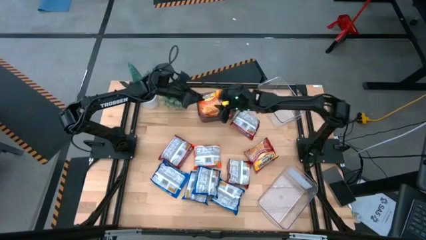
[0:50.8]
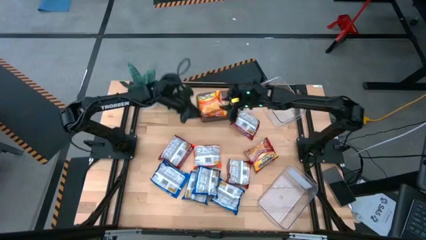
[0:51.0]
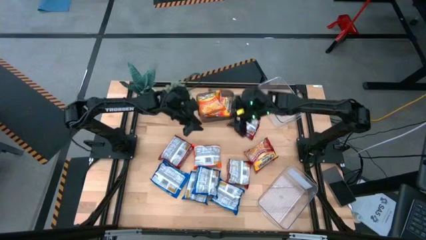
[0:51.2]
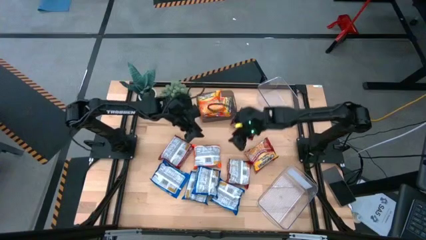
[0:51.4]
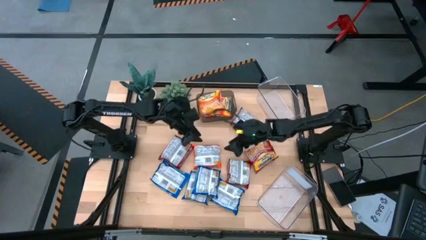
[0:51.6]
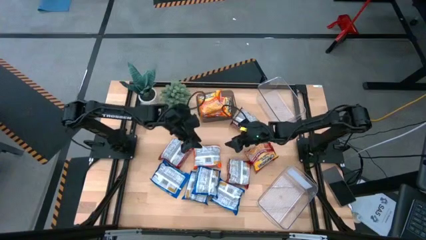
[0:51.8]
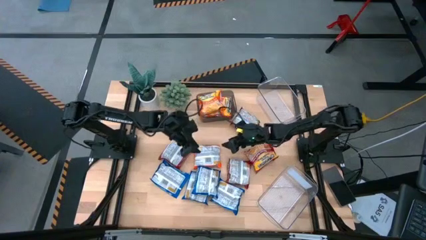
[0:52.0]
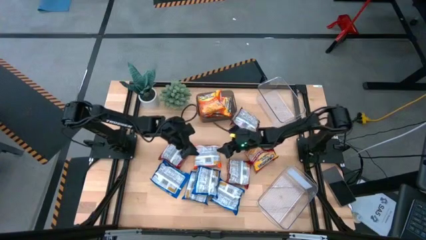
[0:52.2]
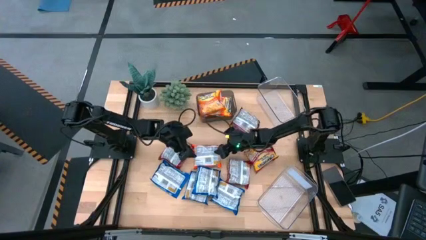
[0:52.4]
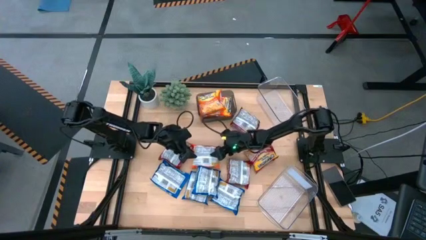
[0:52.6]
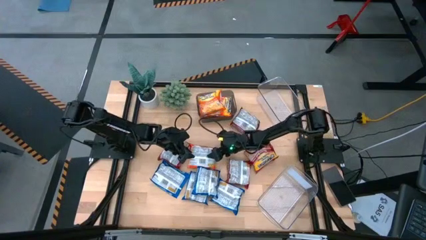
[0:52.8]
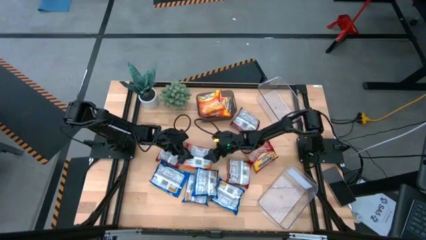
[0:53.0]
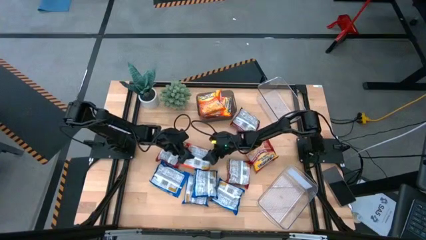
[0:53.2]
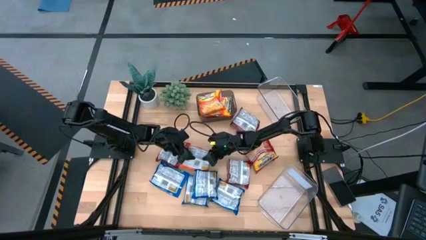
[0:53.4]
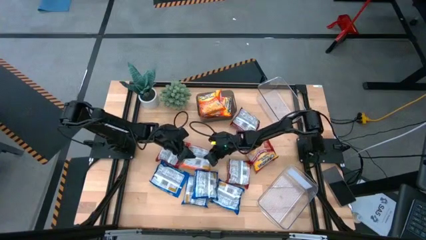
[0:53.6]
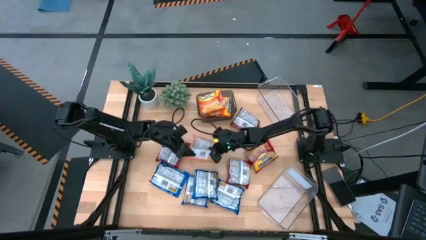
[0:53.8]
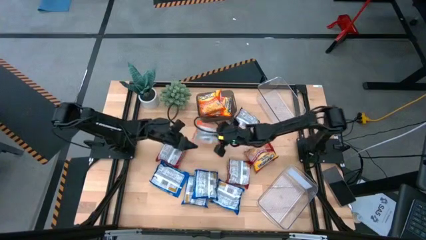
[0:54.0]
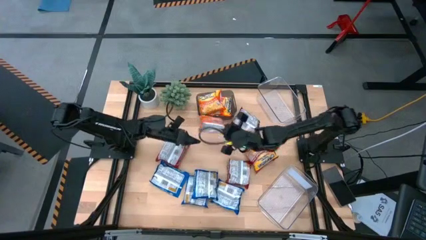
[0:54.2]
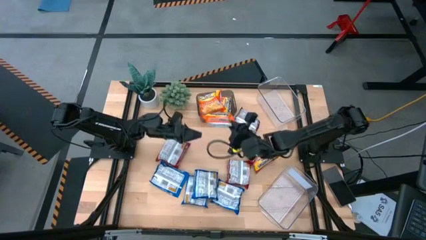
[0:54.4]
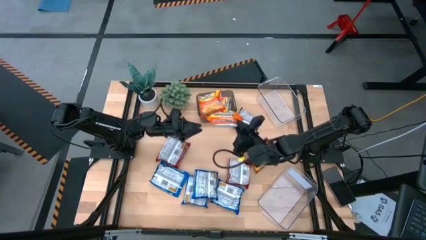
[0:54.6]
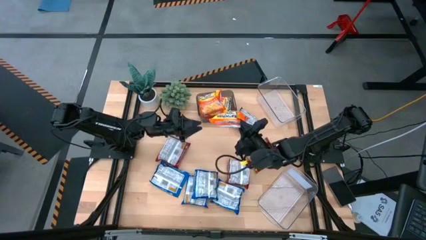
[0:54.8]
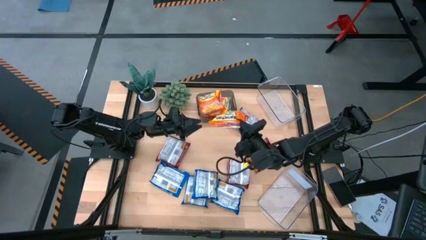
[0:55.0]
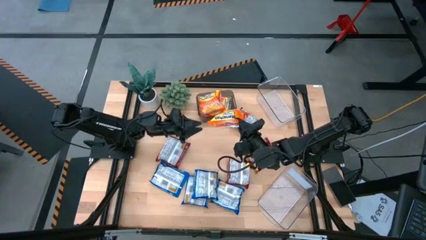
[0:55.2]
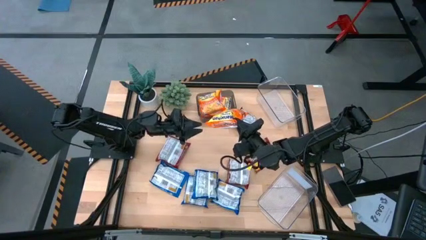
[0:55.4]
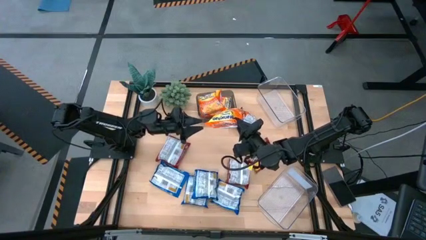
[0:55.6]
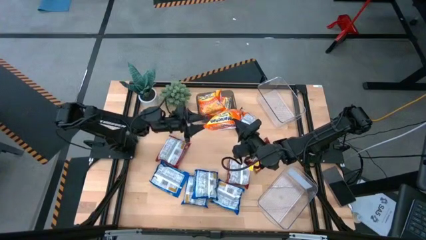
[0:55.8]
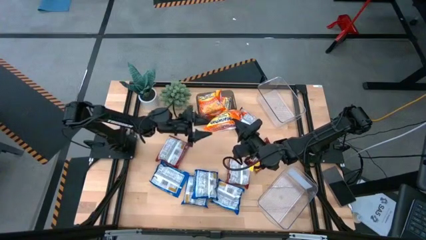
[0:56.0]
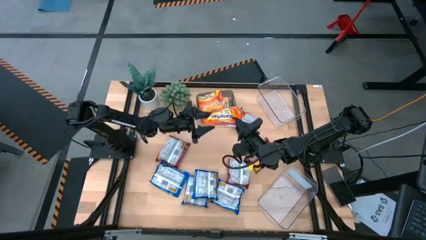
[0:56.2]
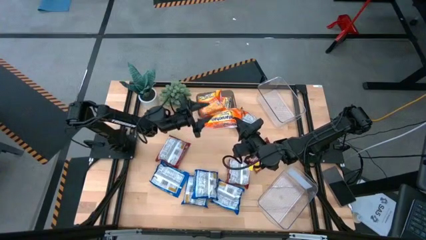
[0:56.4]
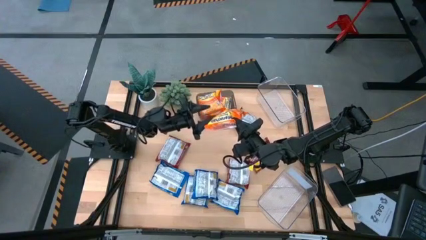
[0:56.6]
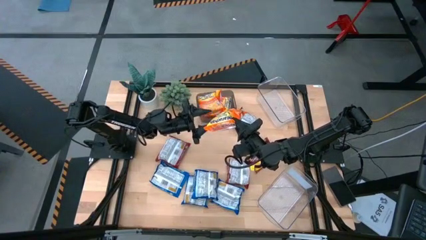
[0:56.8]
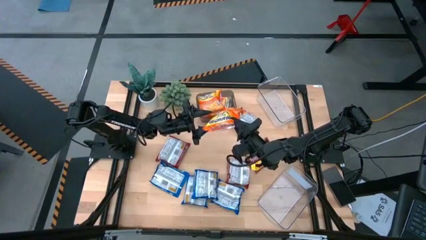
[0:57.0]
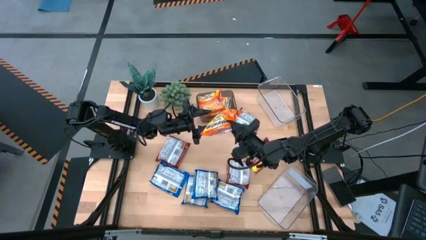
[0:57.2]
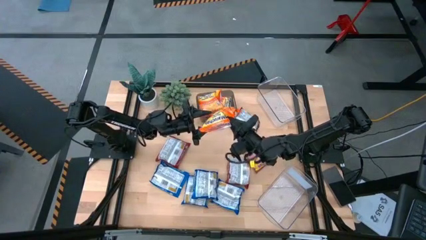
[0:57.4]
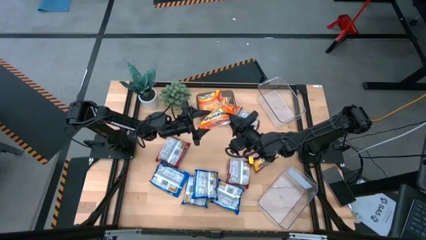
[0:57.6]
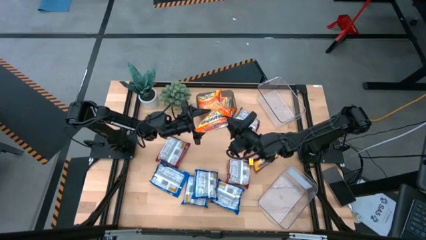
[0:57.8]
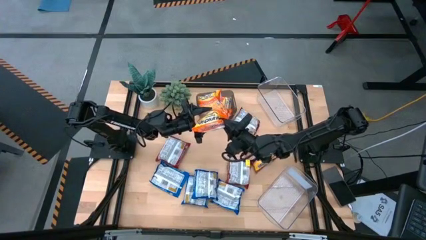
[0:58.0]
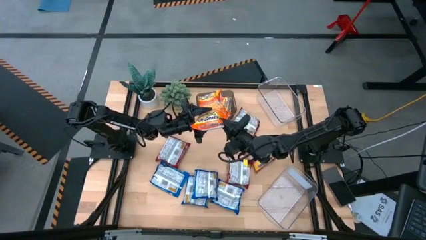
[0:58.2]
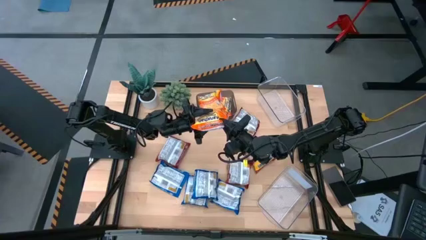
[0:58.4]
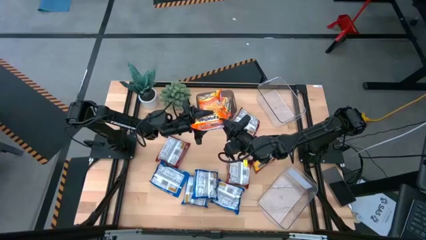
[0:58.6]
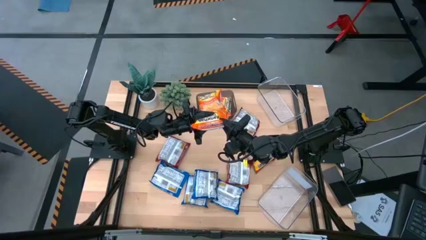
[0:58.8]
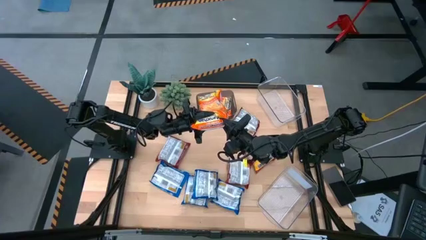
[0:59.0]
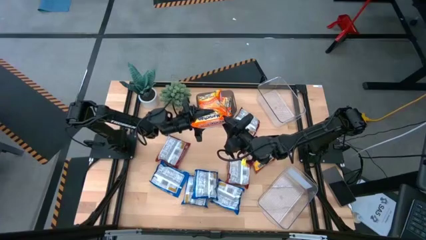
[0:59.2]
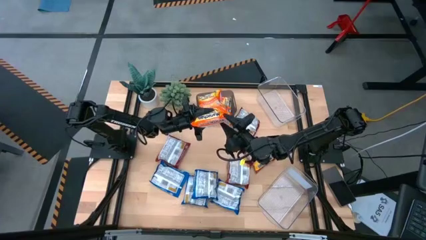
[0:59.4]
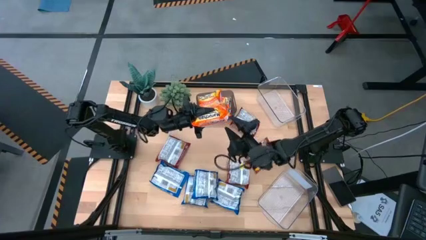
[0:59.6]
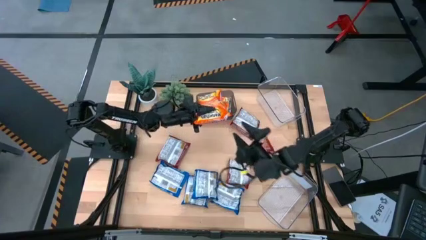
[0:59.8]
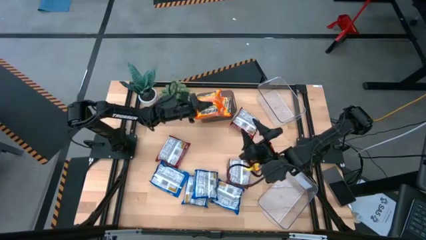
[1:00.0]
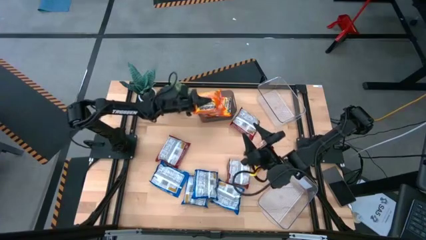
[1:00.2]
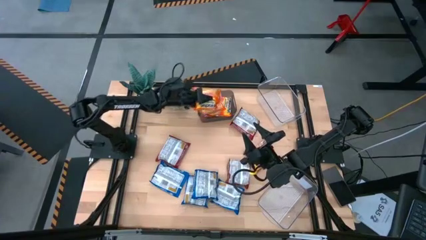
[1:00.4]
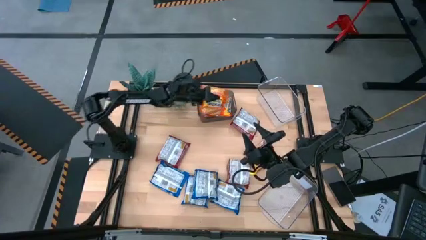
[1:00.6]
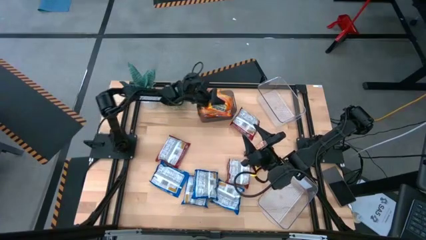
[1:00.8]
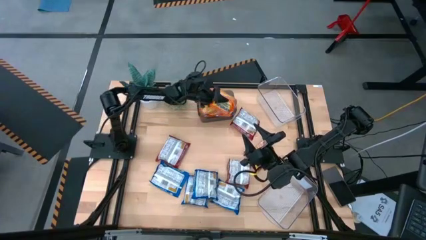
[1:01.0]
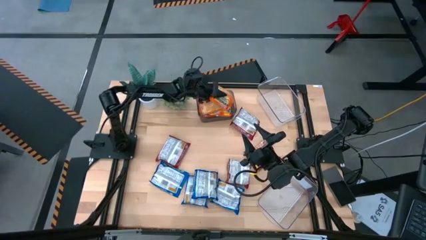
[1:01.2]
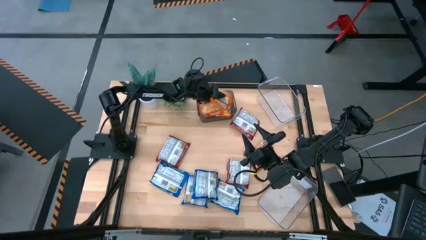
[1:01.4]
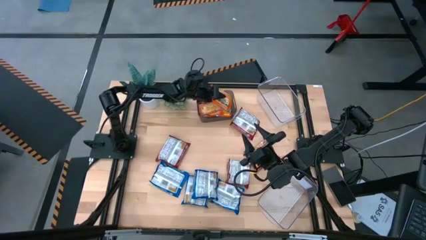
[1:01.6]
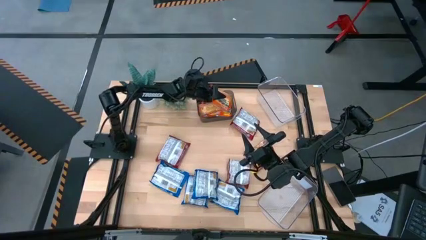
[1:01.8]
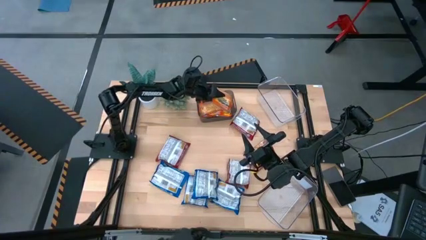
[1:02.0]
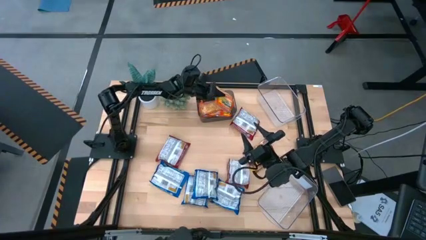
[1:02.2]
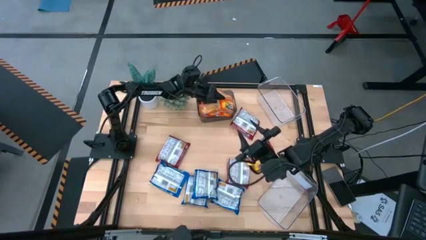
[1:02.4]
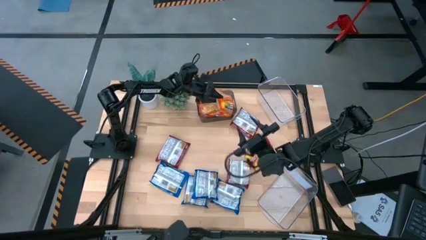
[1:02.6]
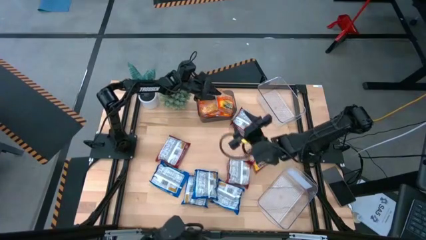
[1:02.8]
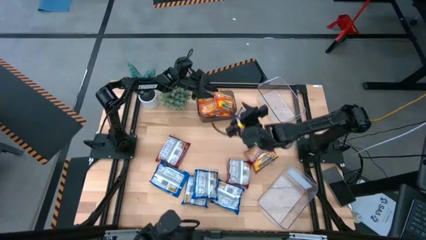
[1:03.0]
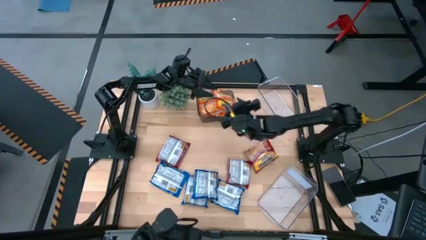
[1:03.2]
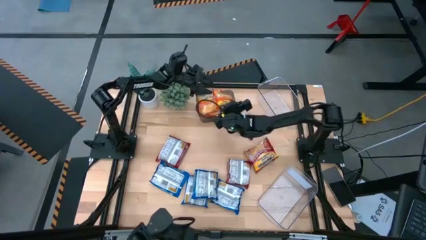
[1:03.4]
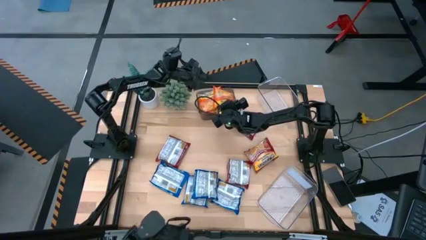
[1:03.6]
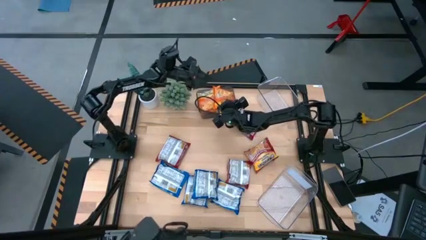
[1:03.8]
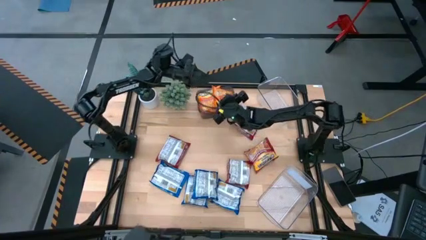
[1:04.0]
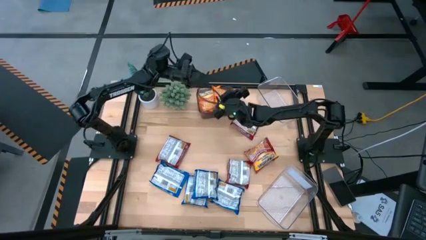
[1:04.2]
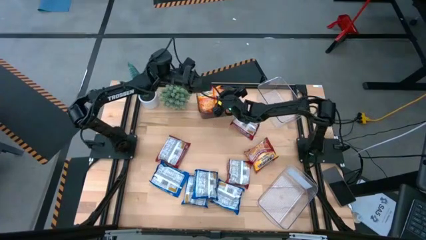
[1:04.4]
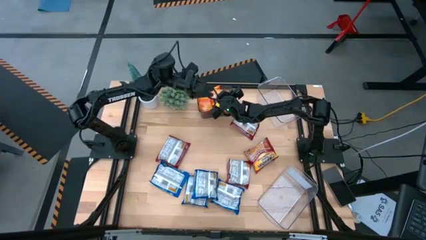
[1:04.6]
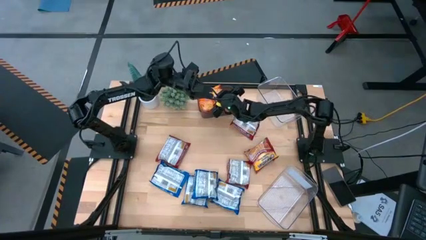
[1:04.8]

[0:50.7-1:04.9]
Task: Sort Maruchan noodles
Put the orange noodle pack into the black bin
